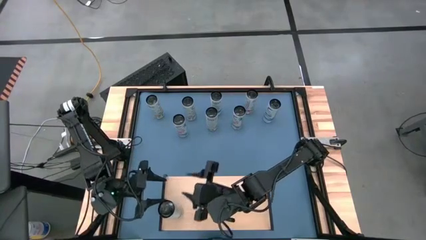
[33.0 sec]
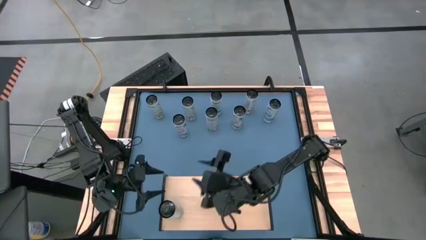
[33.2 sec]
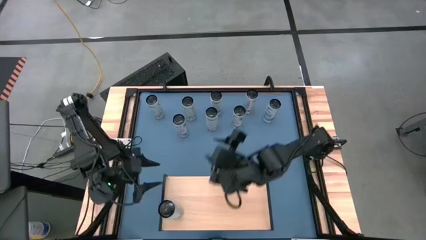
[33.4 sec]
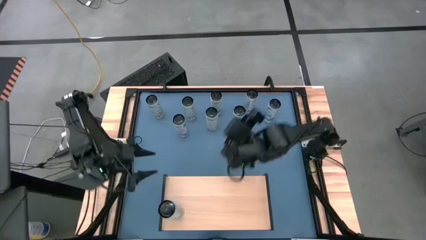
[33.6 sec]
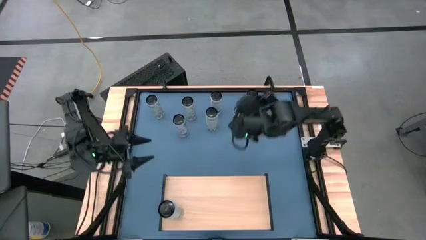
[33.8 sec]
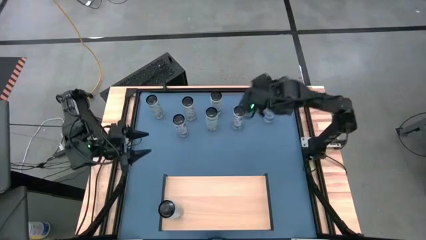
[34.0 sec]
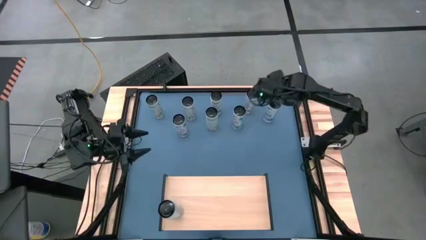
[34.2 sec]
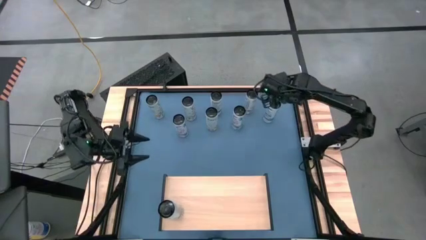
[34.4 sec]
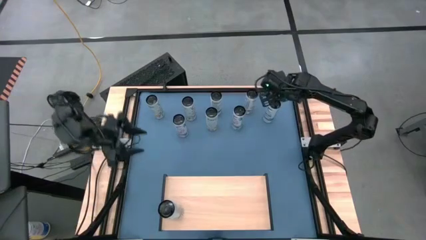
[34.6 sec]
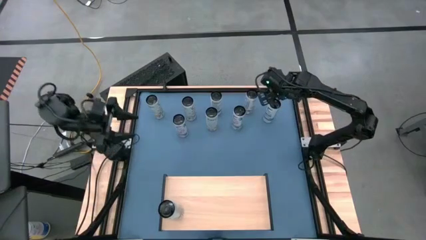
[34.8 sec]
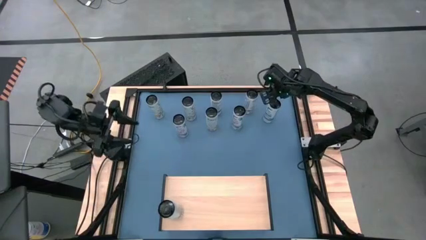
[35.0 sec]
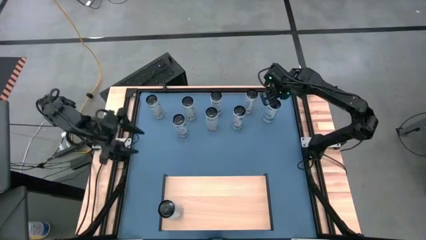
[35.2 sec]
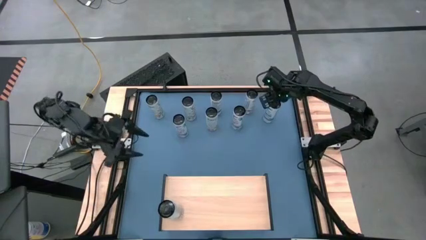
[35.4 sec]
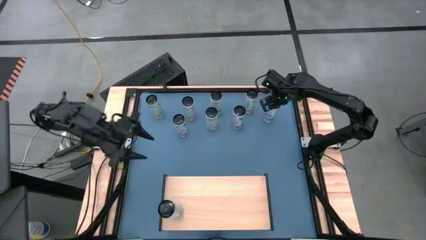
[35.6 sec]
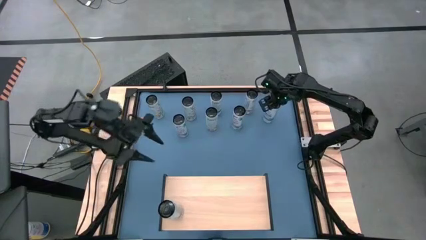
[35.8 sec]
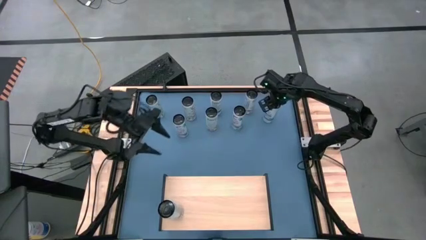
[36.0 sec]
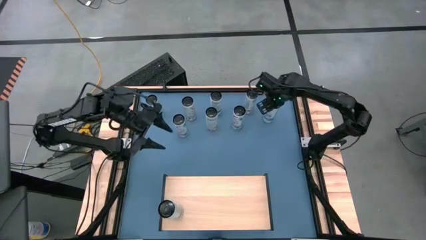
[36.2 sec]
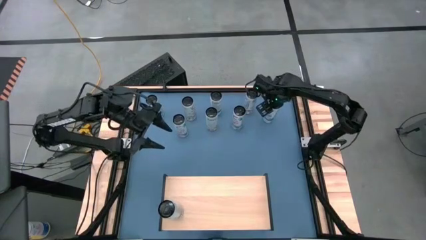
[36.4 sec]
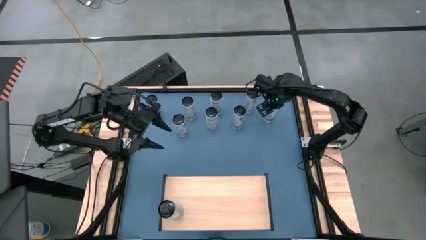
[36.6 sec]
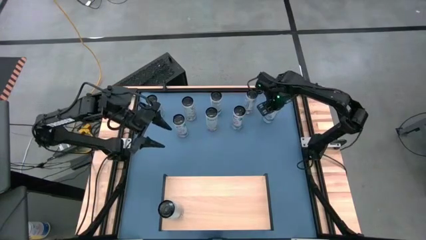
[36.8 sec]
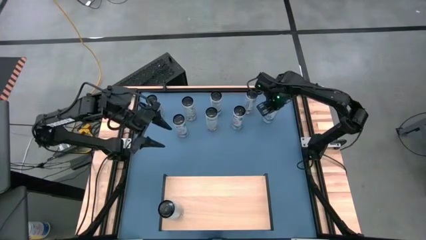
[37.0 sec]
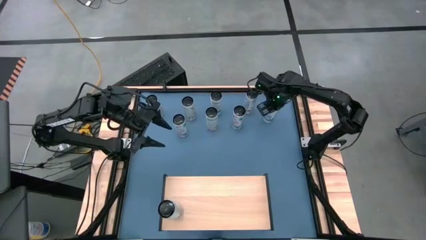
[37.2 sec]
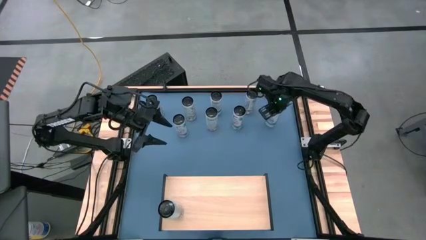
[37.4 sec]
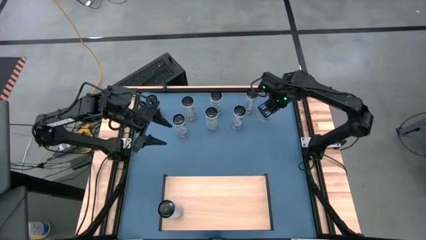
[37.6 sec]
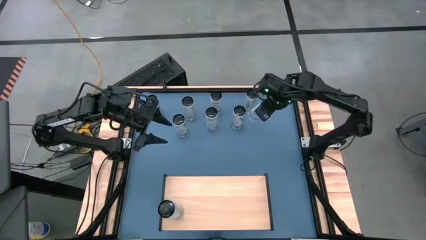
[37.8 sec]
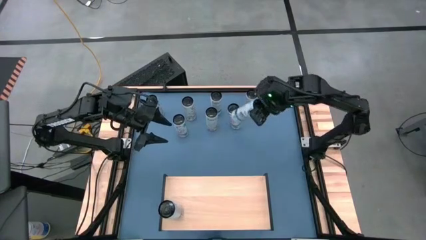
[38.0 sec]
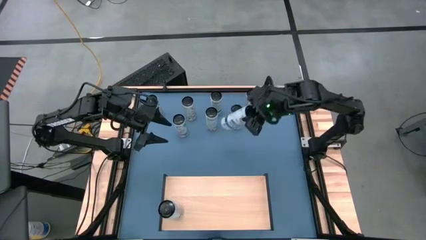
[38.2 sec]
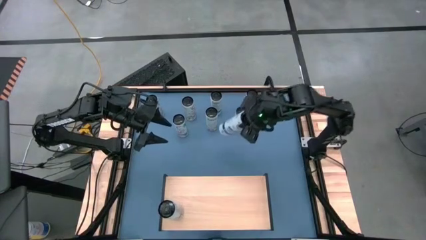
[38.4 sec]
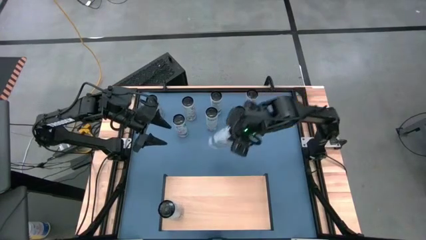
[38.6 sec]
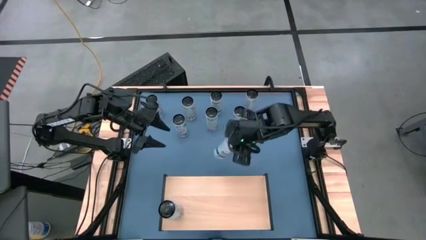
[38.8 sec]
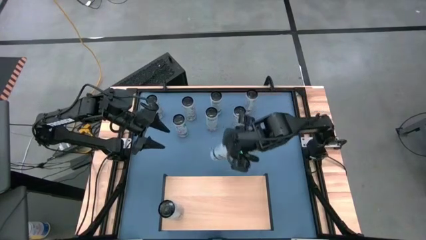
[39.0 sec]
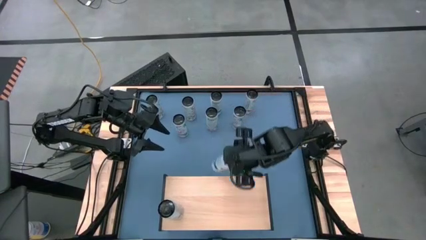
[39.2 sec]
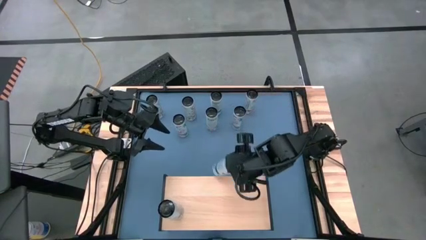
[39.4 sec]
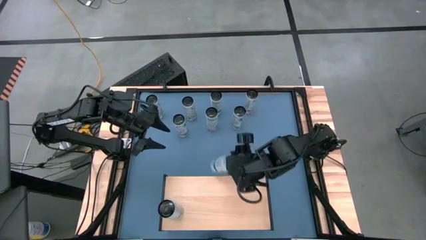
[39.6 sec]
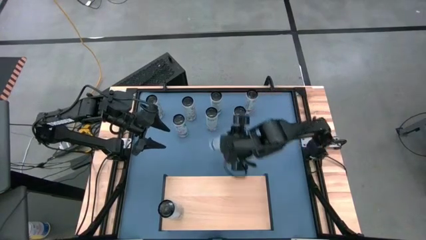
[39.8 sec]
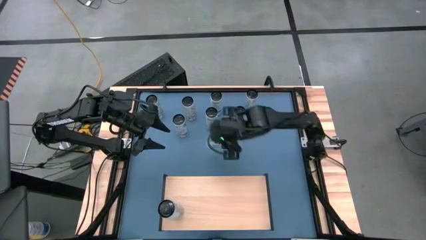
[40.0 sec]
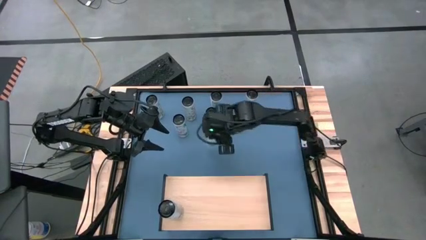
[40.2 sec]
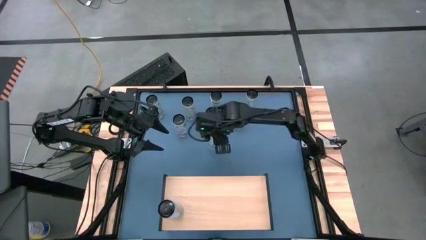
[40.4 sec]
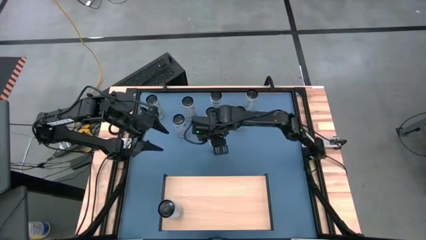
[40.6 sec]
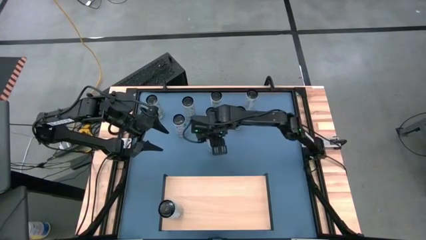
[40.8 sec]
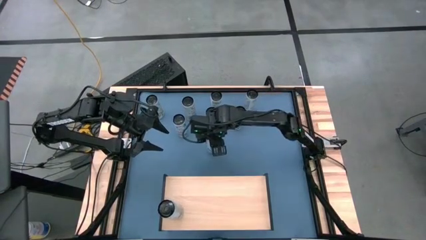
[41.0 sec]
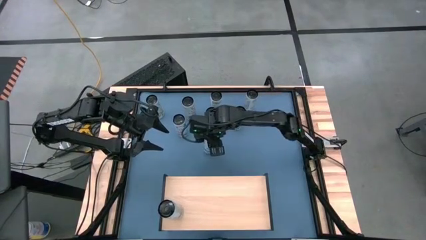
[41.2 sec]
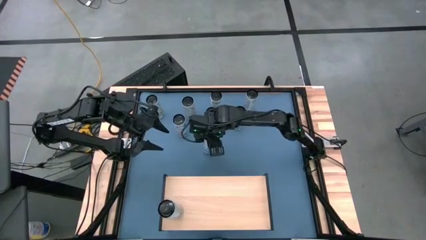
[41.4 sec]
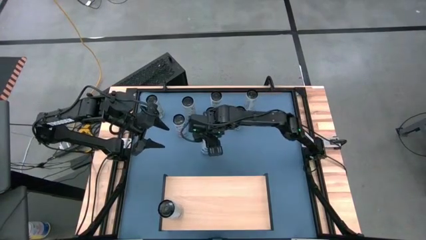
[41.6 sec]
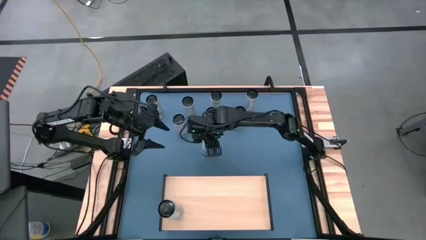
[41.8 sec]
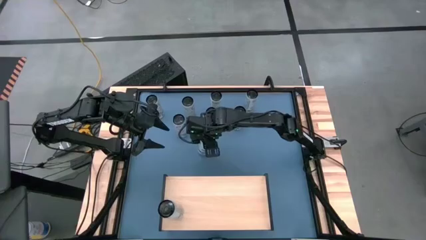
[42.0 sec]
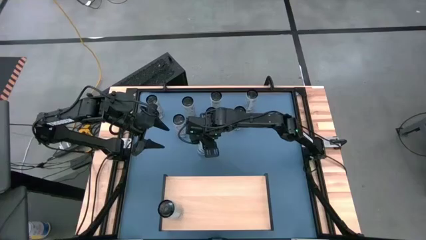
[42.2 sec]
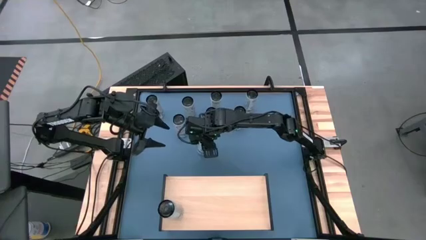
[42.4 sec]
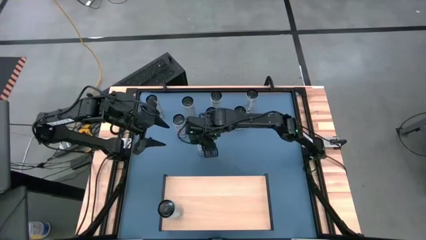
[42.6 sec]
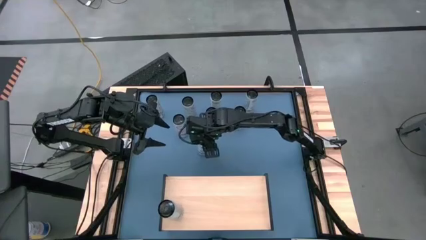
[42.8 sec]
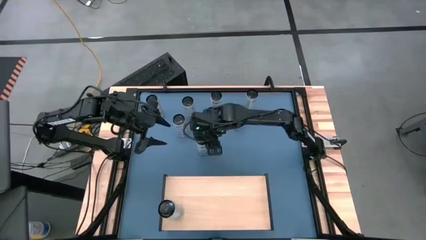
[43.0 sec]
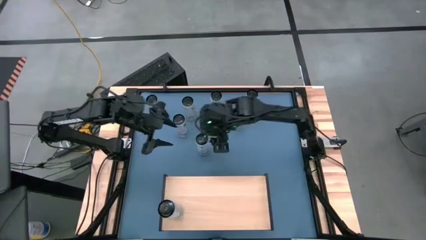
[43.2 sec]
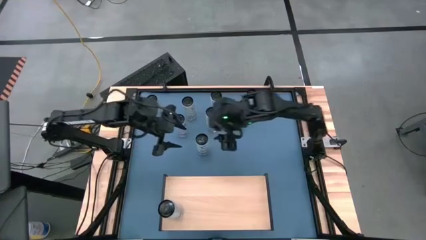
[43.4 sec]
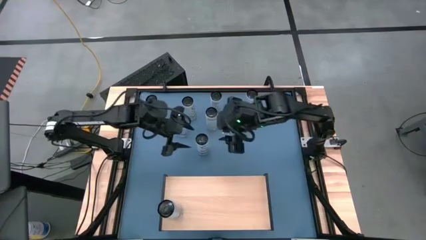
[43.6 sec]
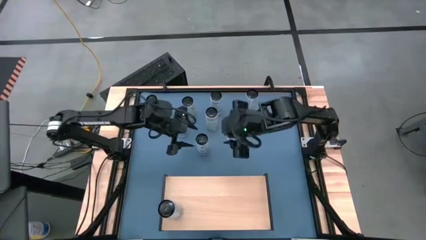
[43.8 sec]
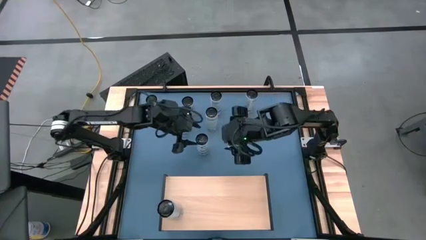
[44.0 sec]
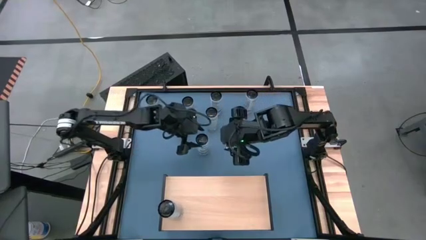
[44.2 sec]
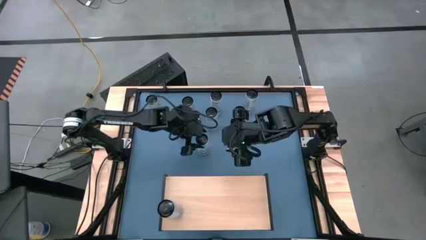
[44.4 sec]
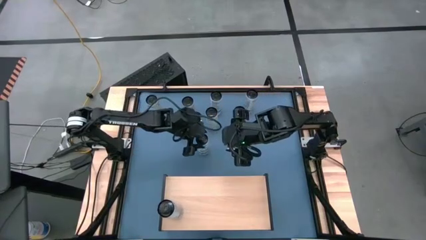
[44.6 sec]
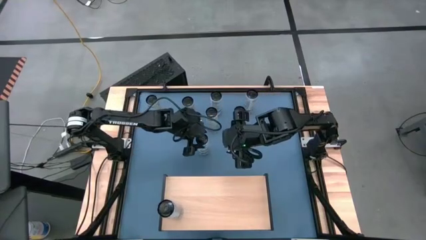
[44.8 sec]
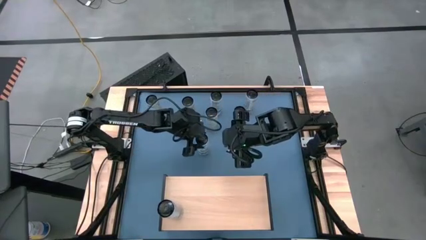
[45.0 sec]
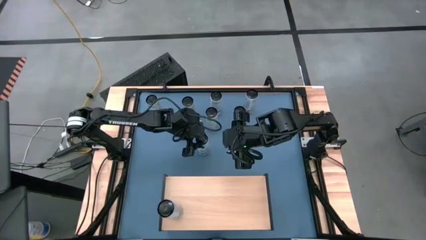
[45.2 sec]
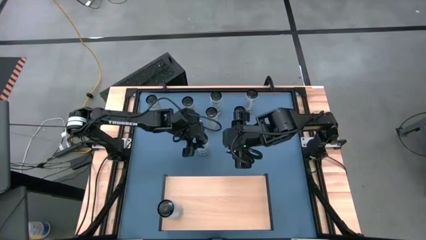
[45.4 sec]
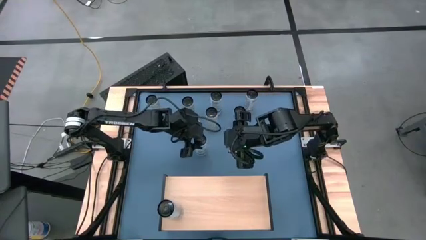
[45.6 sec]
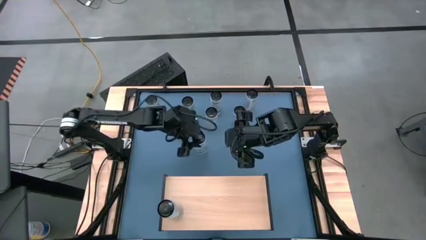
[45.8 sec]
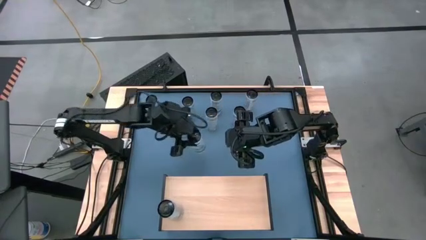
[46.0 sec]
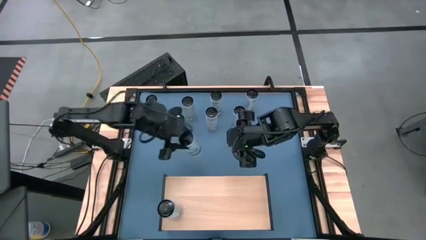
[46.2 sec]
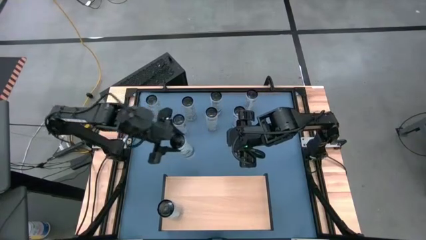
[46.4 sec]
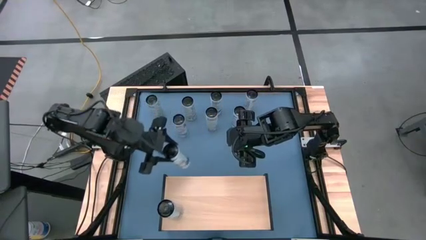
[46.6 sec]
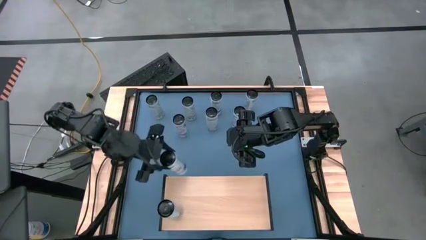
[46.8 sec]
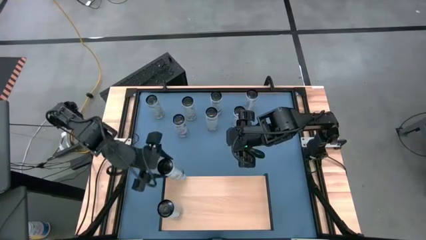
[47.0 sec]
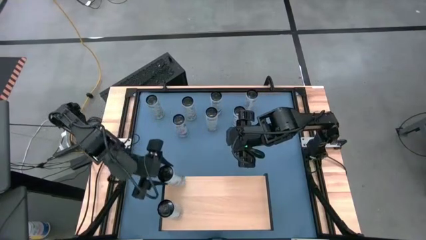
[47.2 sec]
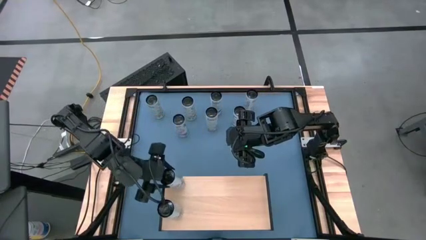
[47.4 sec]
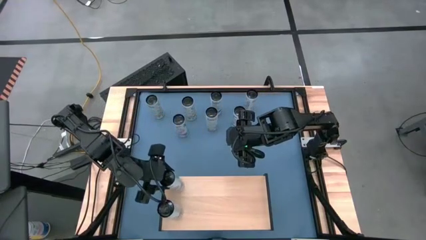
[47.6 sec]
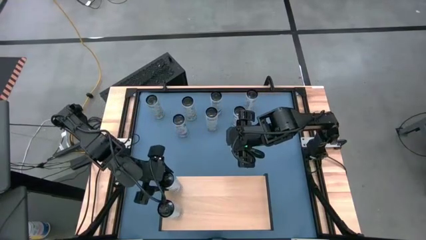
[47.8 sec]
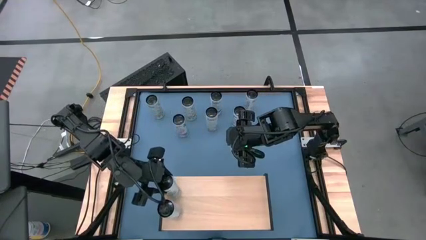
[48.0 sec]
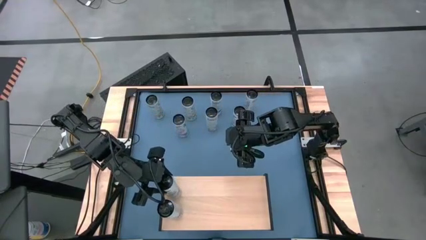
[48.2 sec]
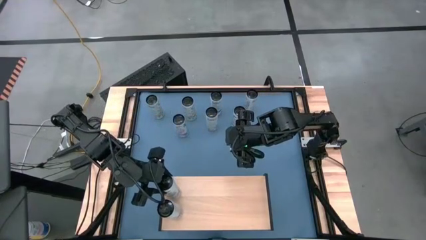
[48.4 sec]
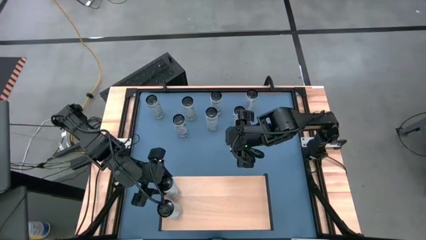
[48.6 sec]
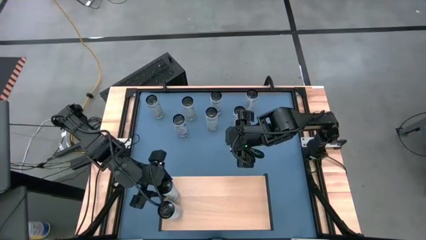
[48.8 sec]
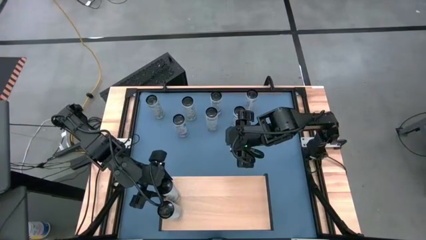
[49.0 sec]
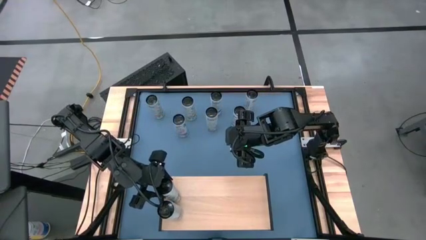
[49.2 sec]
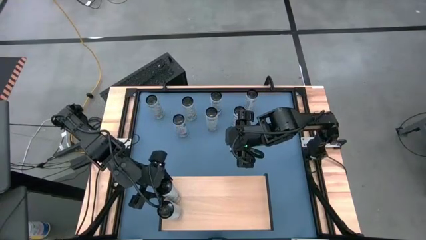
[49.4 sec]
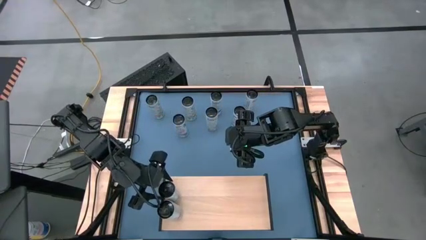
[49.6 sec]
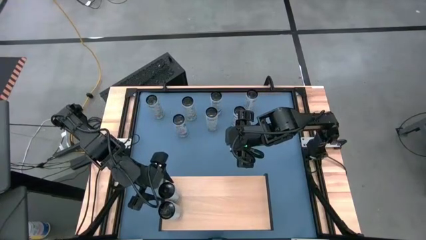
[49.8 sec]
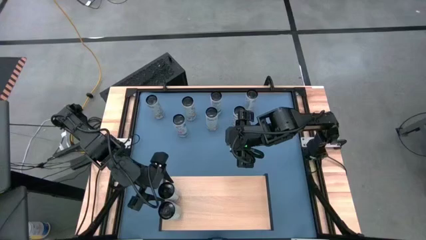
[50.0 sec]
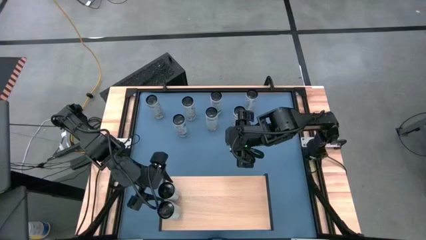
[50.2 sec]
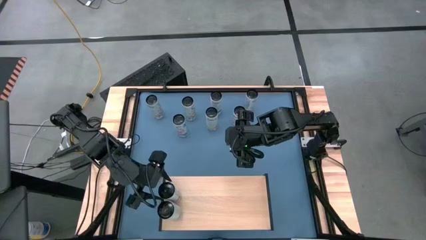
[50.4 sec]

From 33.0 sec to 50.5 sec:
Task: Place canned beverage on shelf
Put the right white blue soda can on the shelf aligned with the other white blue soda can
